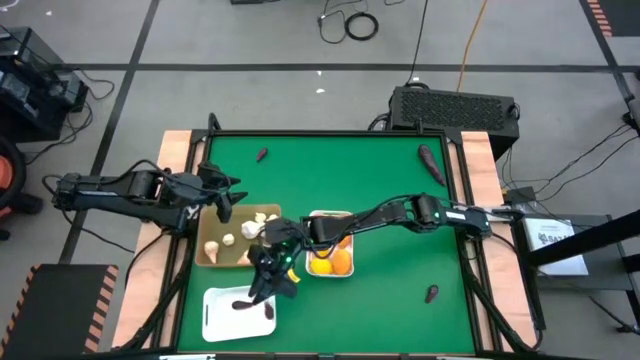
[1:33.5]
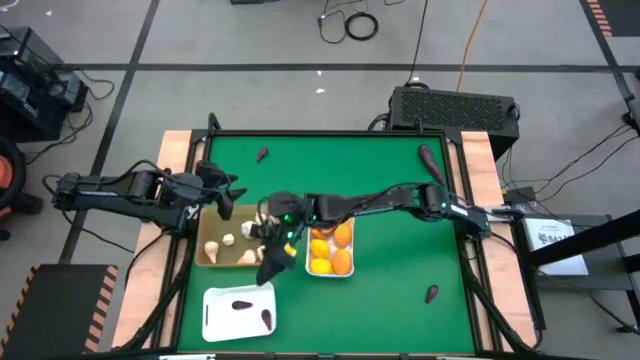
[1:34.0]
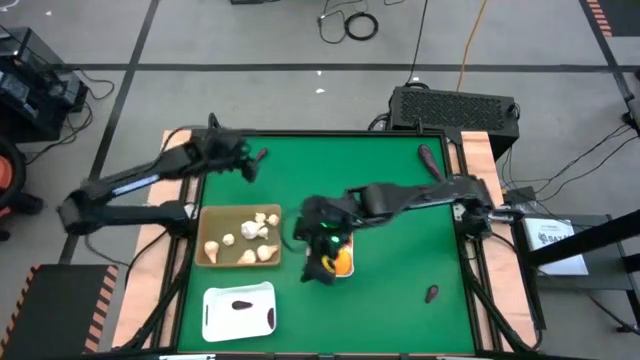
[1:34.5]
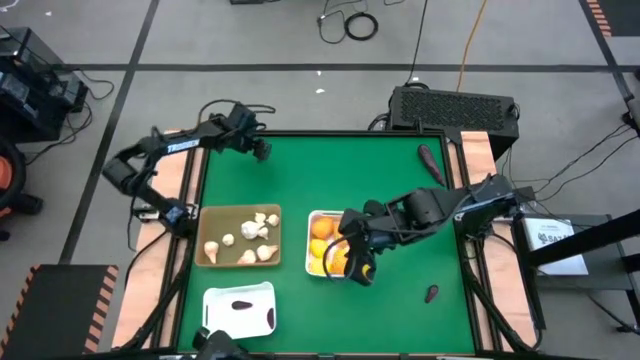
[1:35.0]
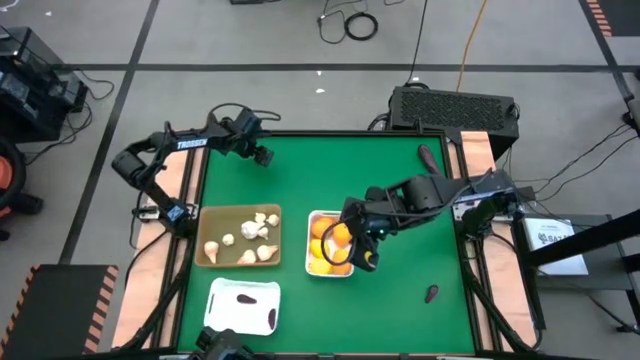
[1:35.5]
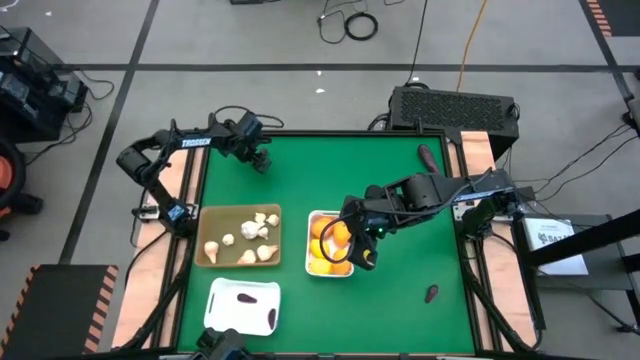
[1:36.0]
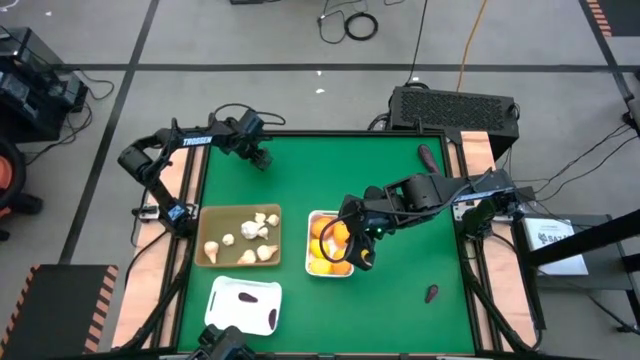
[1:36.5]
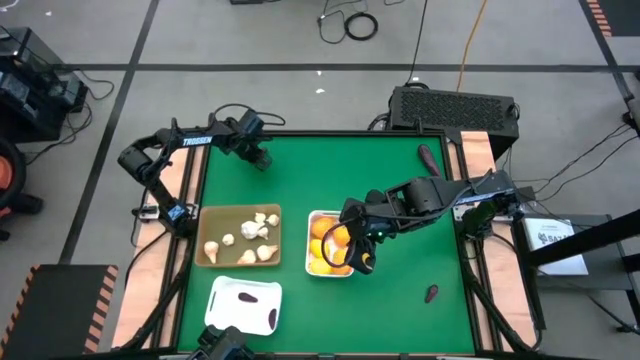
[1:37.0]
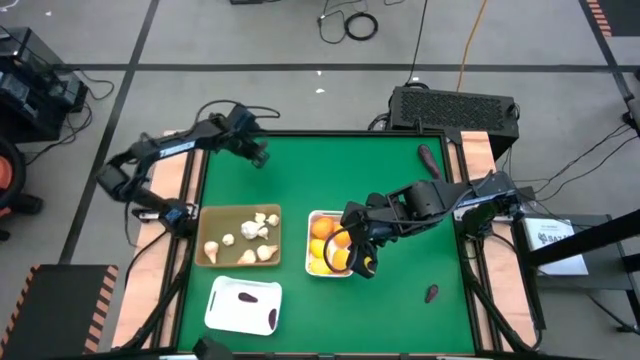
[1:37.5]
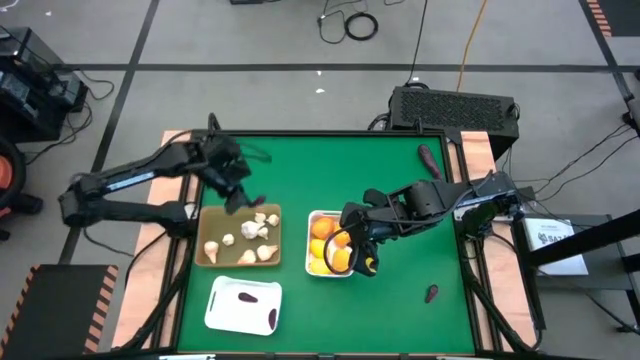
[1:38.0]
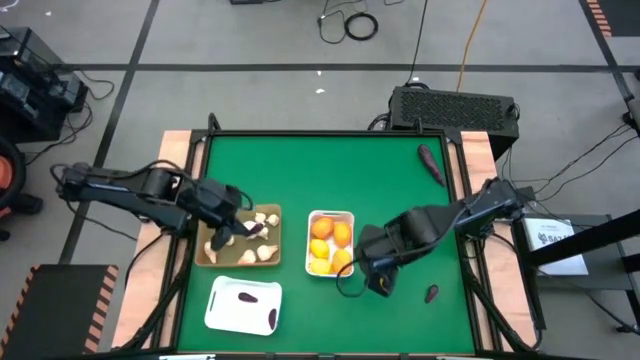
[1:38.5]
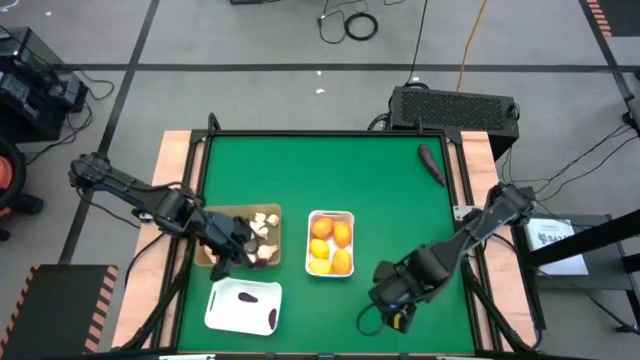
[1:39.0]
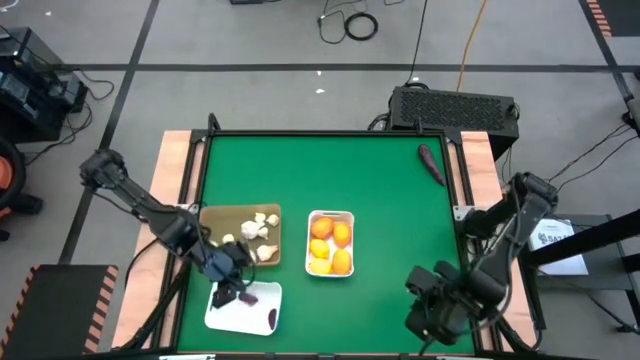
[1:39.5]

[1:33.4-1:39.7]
Task: Sort produce into baskets
Put the purple eggplant into the bottom white bin

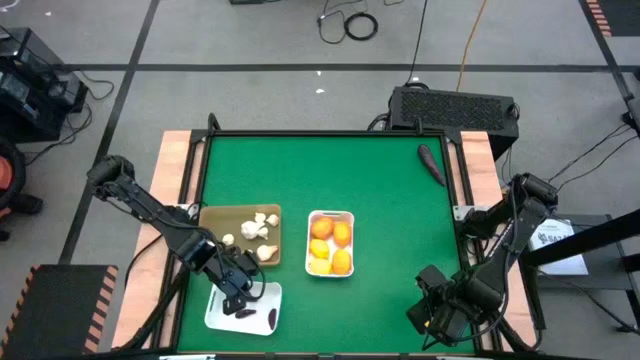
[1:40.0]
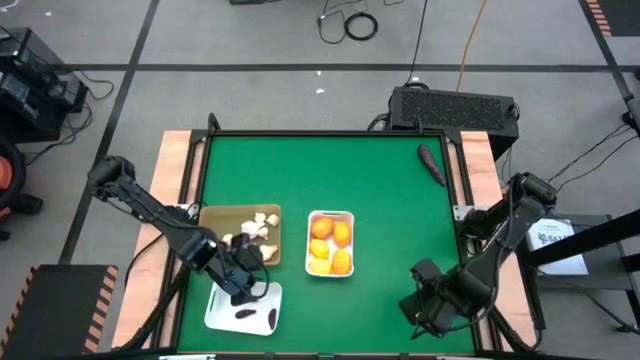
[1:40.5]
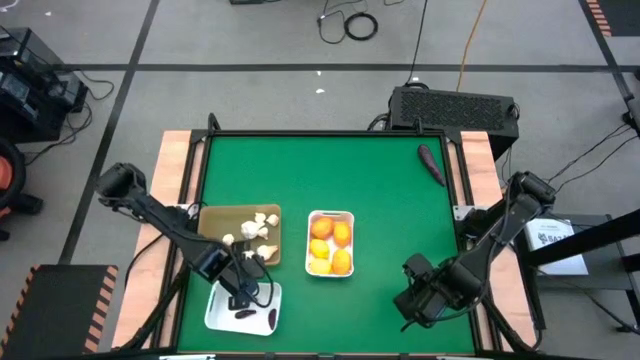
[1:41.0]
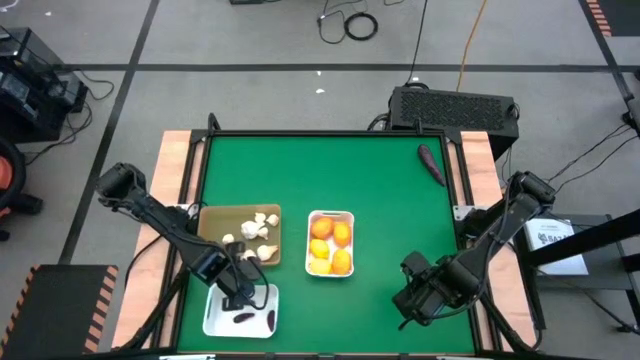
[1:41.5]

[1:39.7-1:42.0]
Adjust the white bin

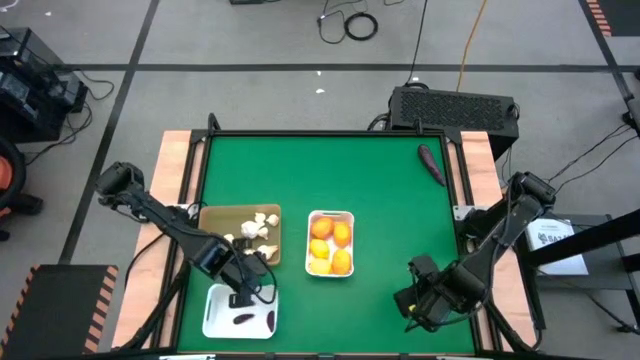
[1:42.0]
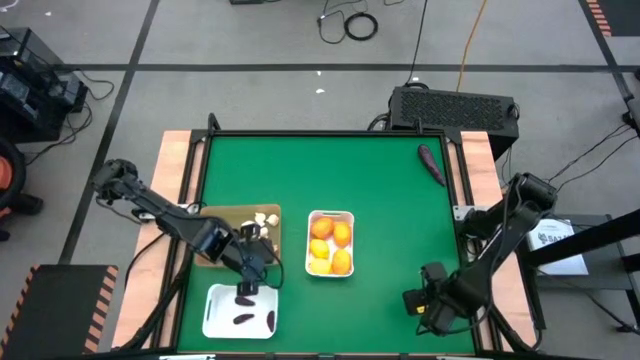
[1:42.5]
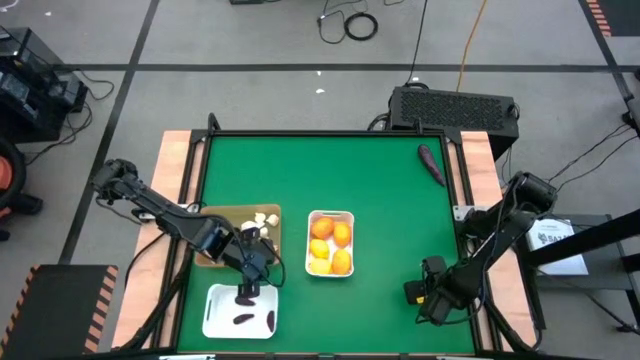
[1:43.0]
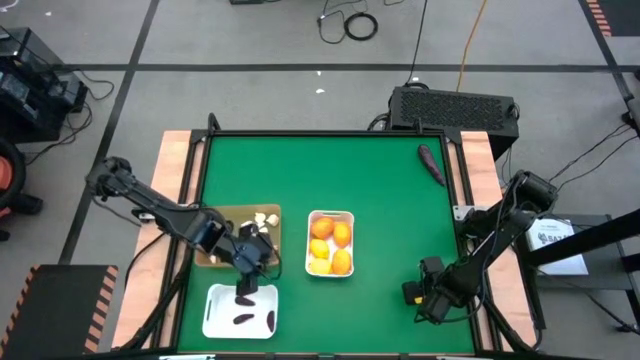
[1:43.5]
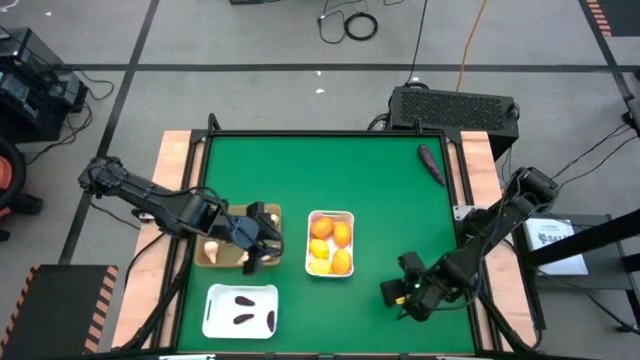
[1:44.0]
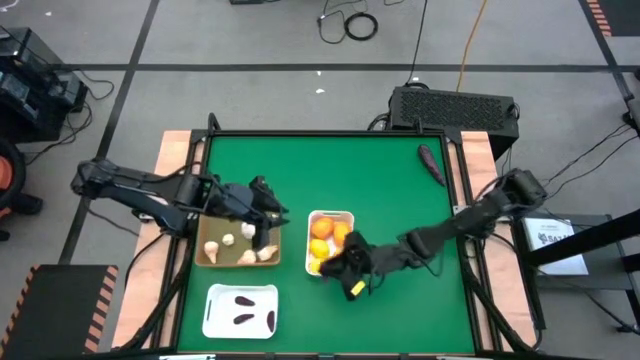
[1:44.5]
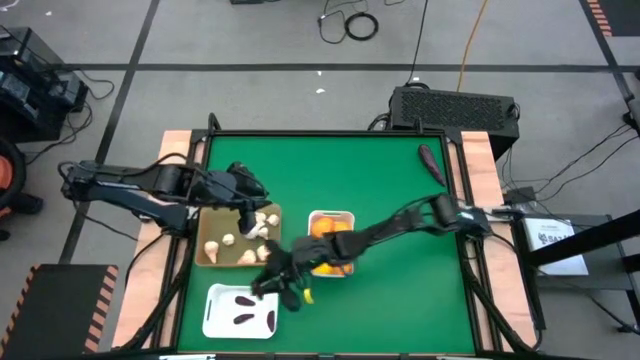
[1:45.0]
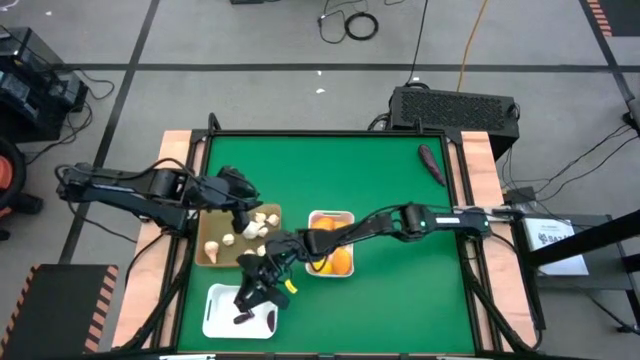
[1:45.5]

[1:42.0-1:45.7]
Put the purple eggplant into the bottom white bin

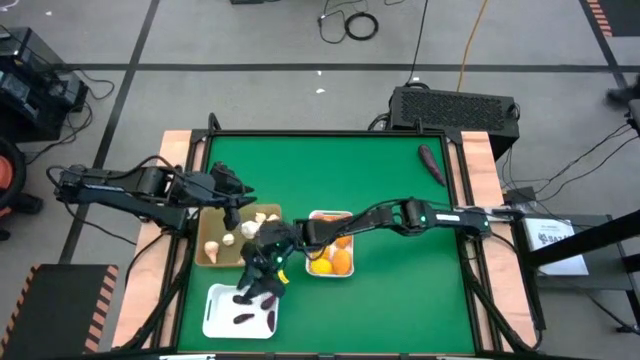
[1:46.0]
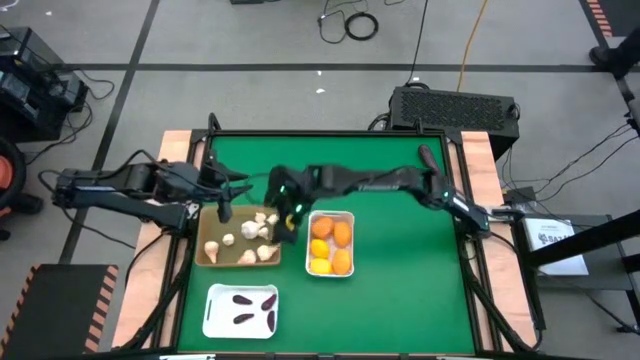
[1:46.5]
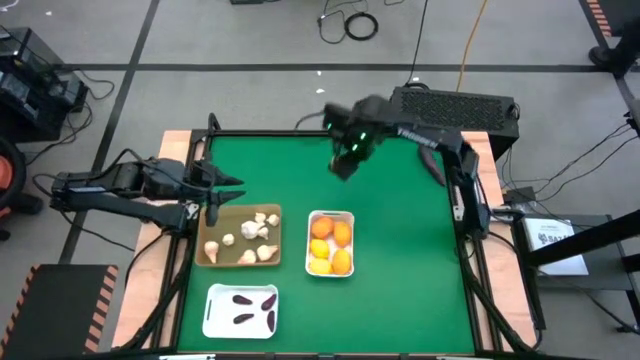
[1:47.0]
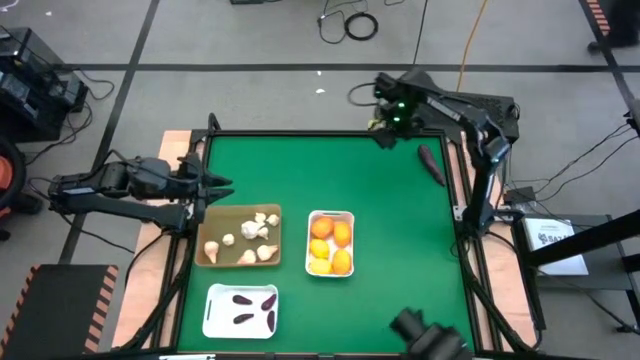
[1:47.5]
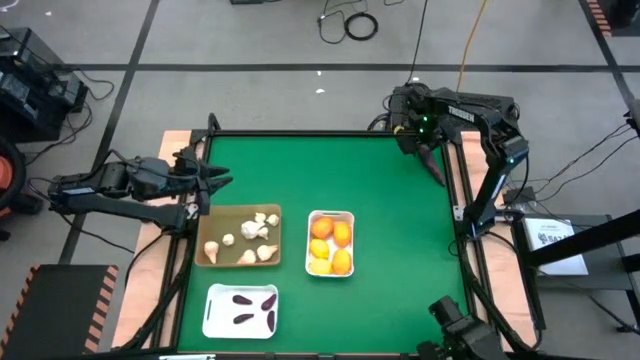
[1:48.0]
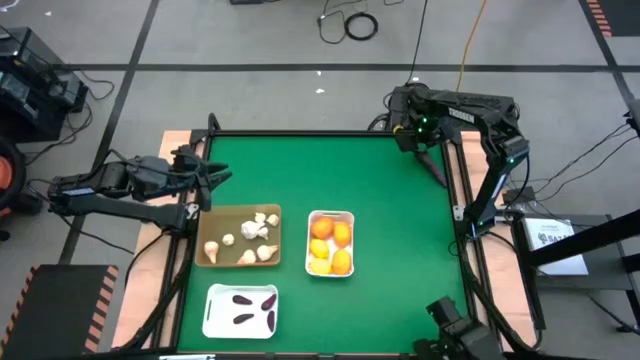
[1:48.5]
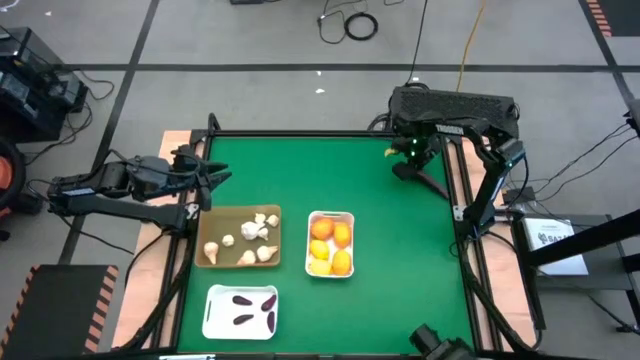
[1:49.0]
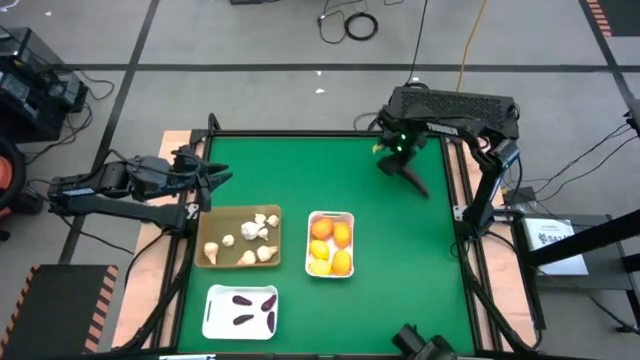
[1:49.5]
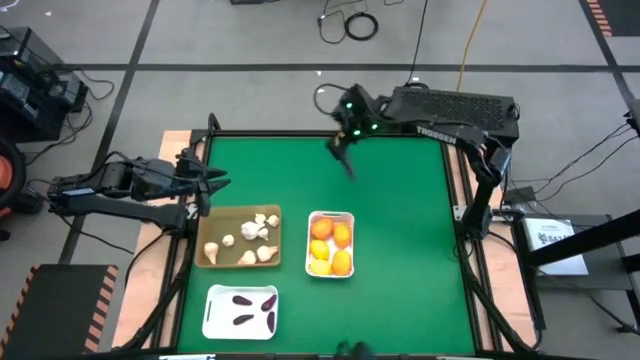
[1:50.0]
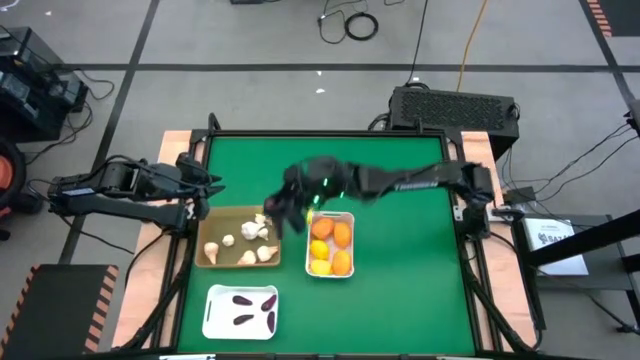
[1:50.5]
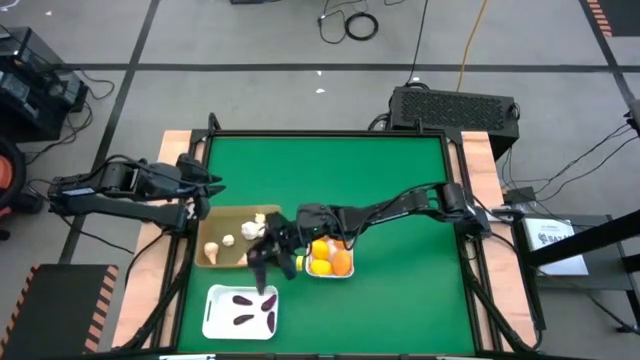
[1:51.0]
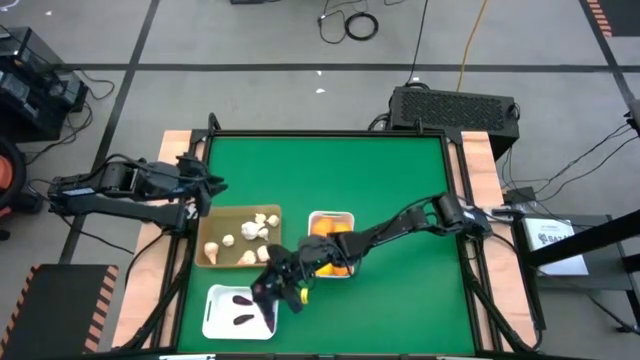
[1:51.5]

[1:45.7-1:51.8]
Put the purple eggplant into the bottom white bin

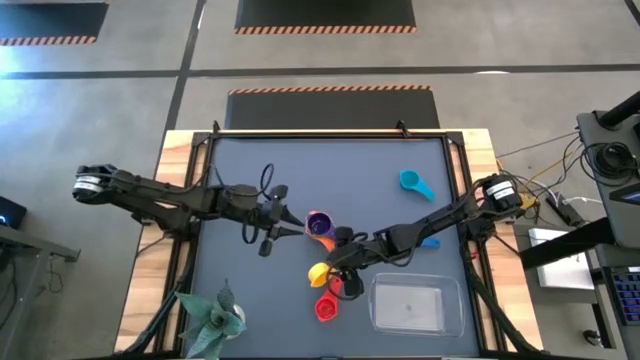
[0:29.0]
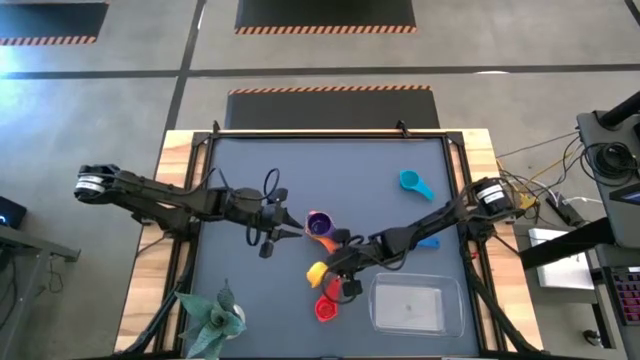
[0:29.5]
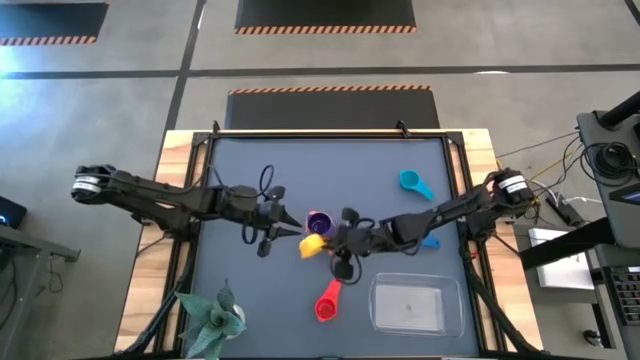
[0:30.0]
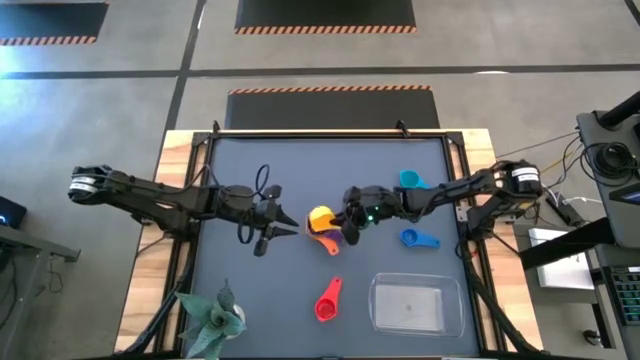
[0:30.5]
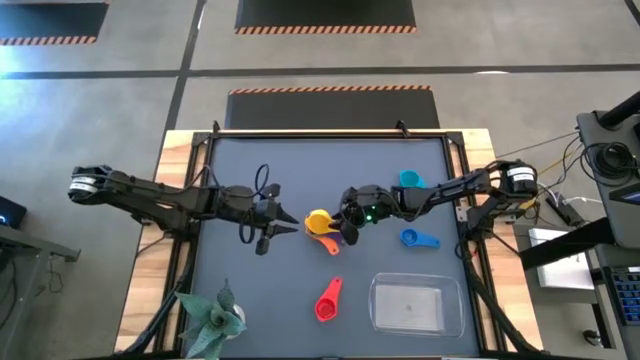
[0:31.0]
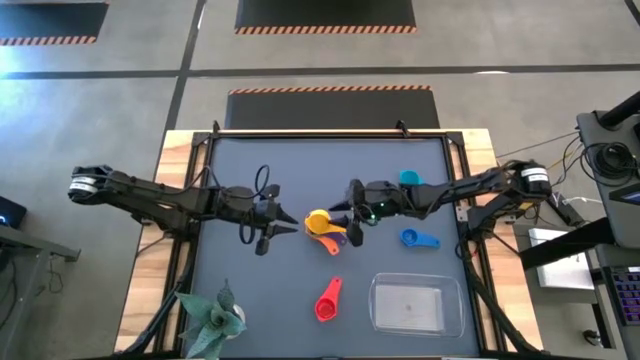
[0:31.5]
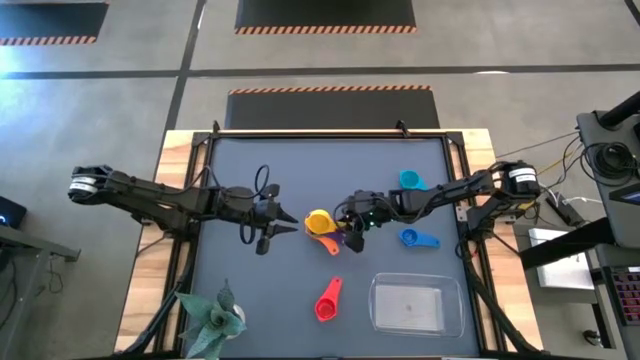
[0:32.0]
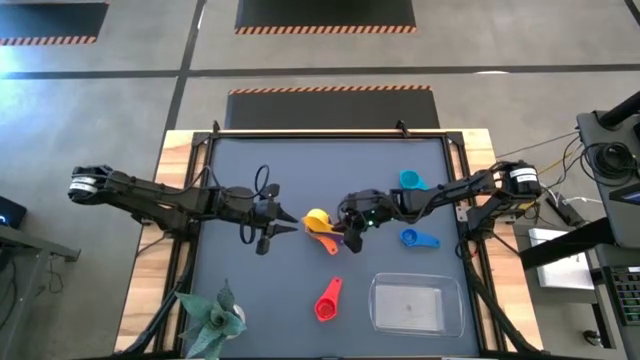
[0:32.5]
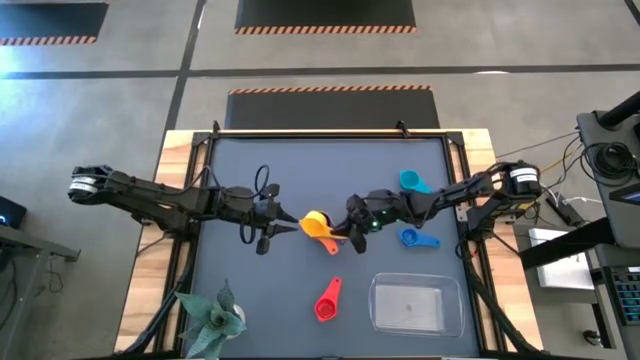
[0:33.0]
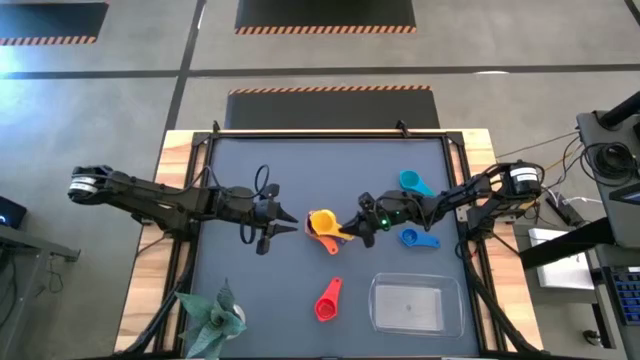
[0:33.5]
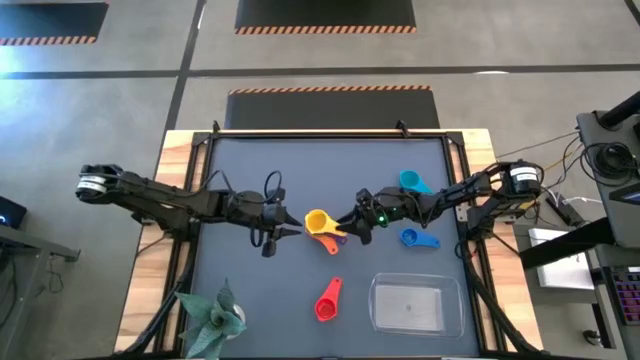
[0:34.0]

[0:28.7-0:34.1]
Task: Nest measuring cups in basket
Stack the yellow measuring cup on top of the purple measuring cup
